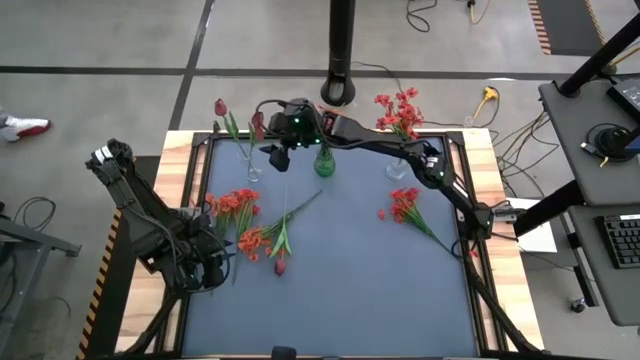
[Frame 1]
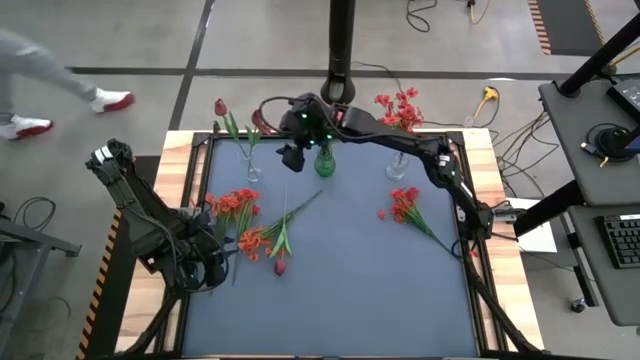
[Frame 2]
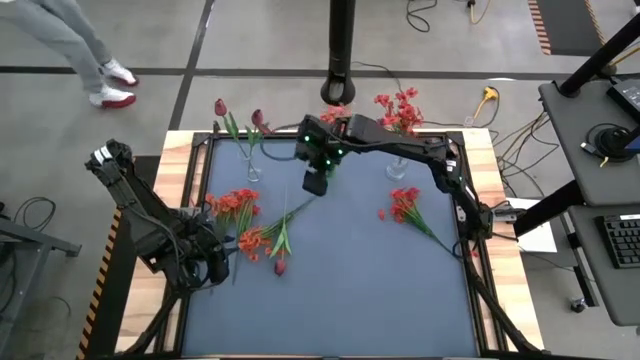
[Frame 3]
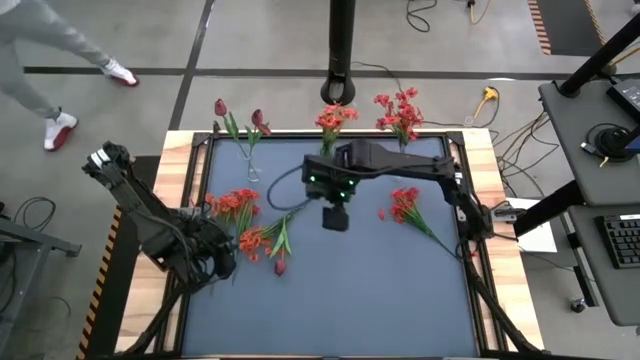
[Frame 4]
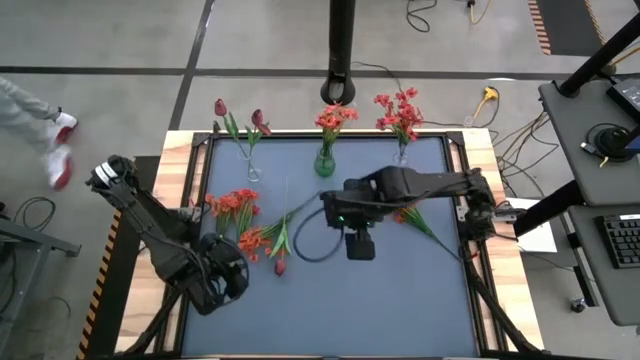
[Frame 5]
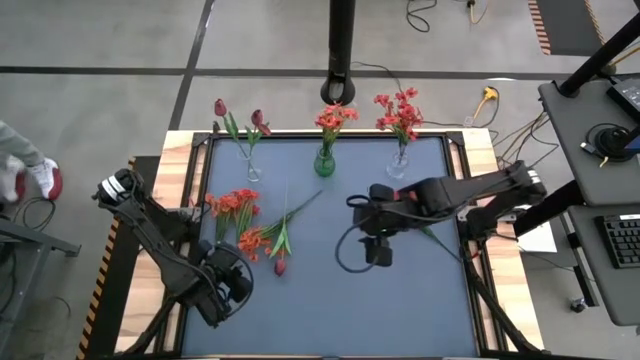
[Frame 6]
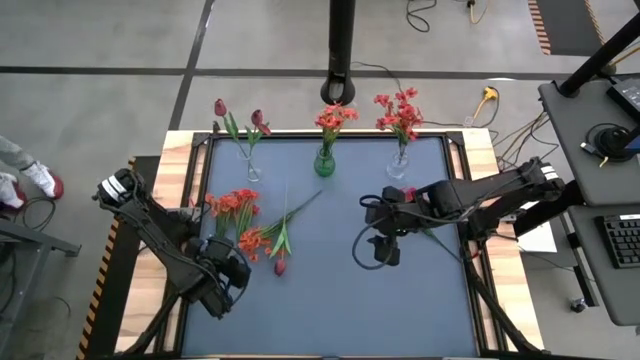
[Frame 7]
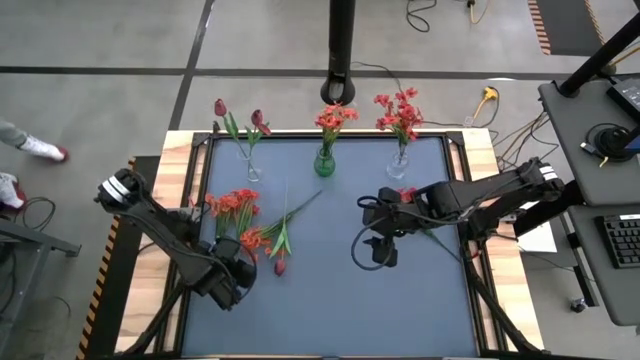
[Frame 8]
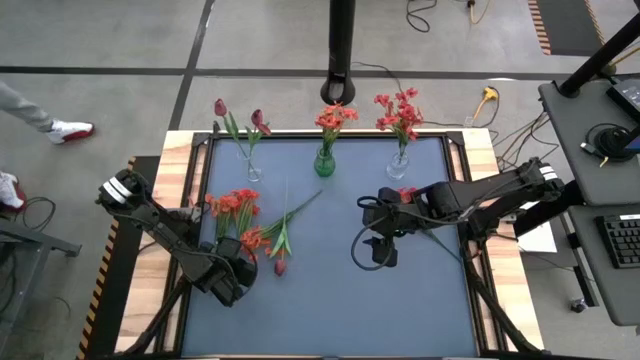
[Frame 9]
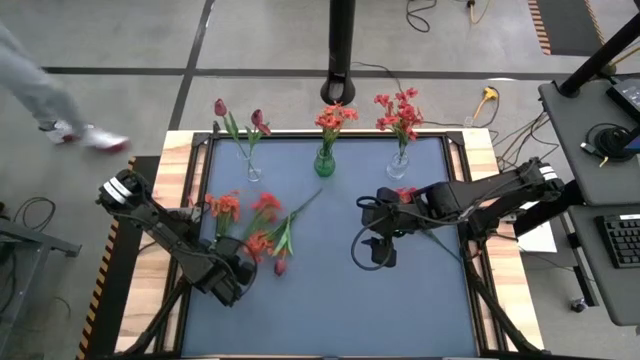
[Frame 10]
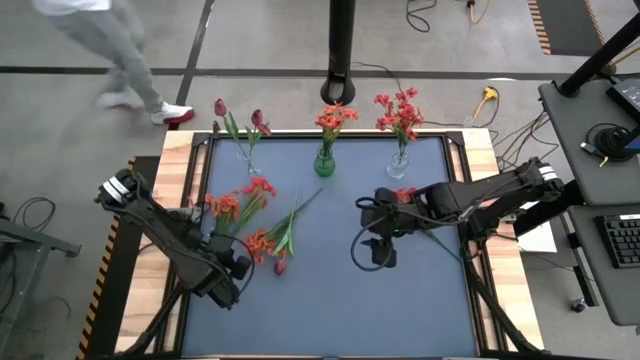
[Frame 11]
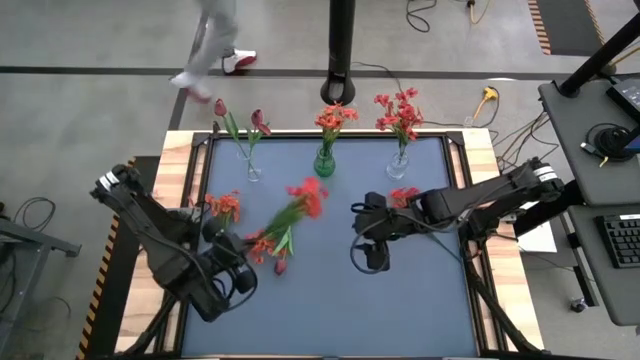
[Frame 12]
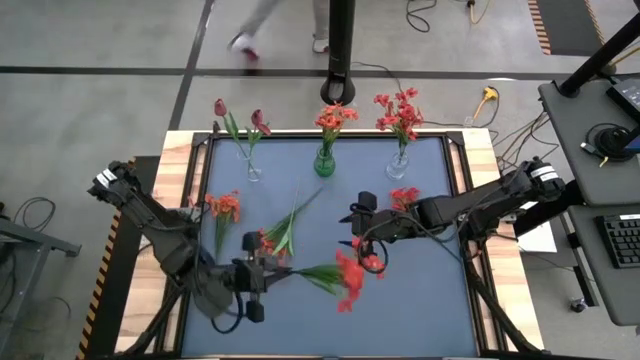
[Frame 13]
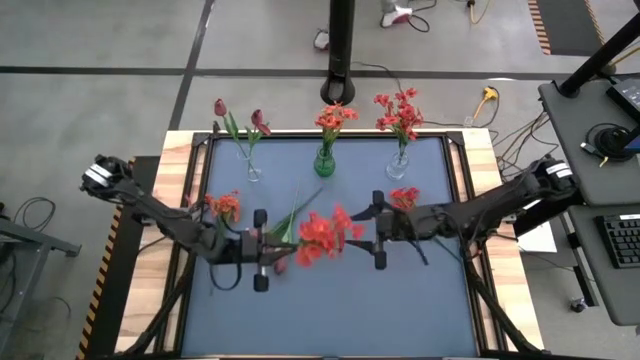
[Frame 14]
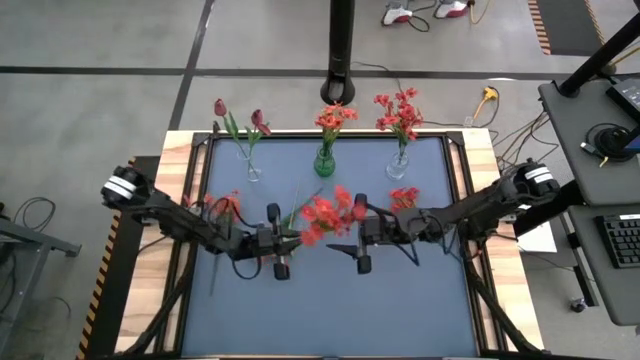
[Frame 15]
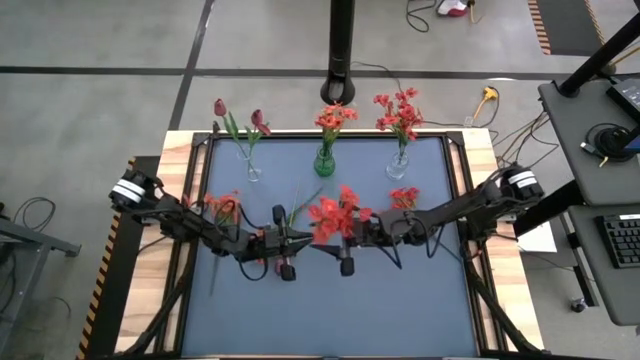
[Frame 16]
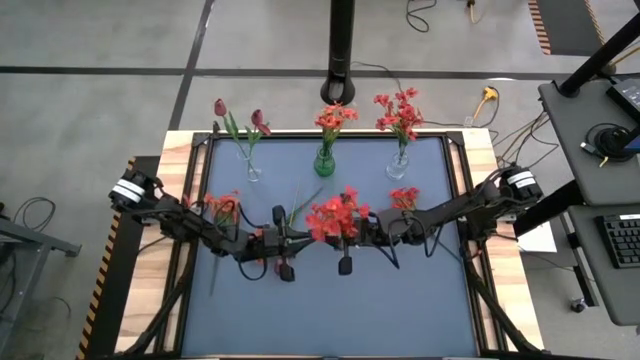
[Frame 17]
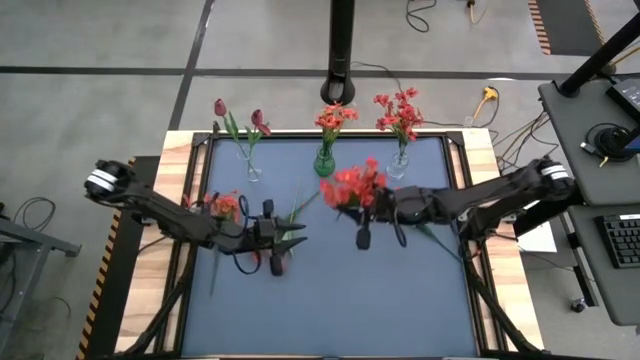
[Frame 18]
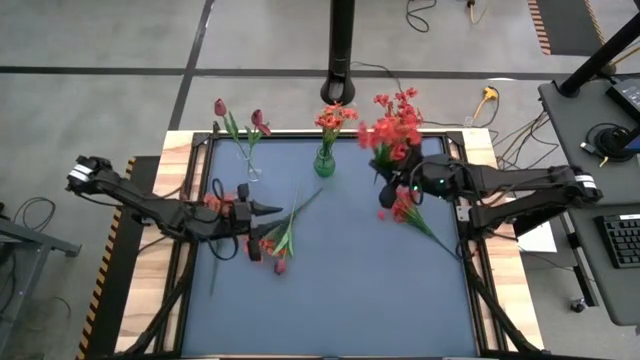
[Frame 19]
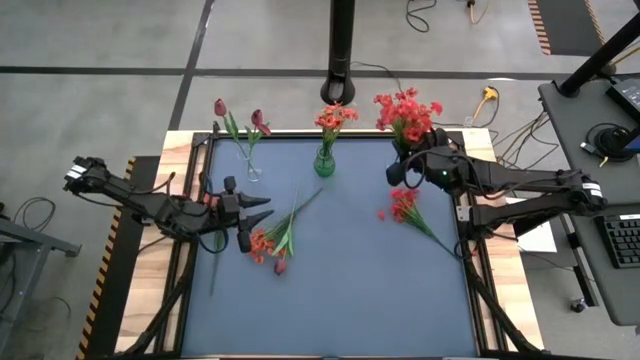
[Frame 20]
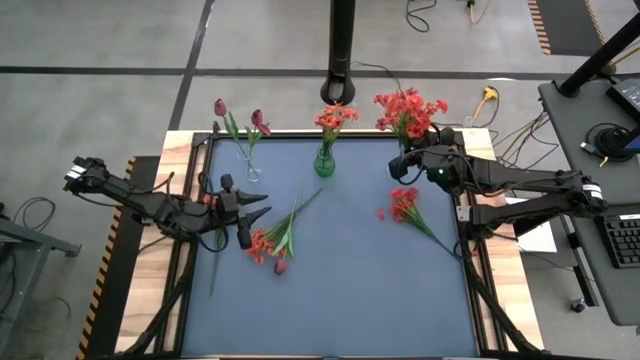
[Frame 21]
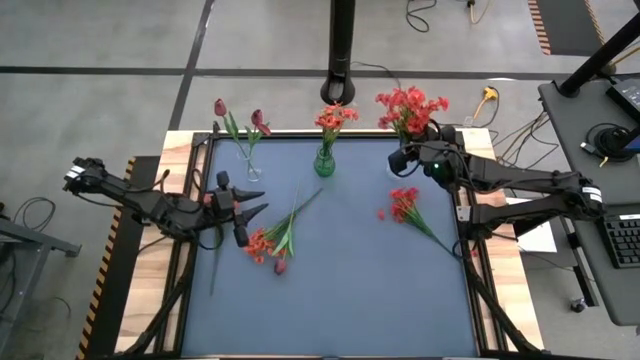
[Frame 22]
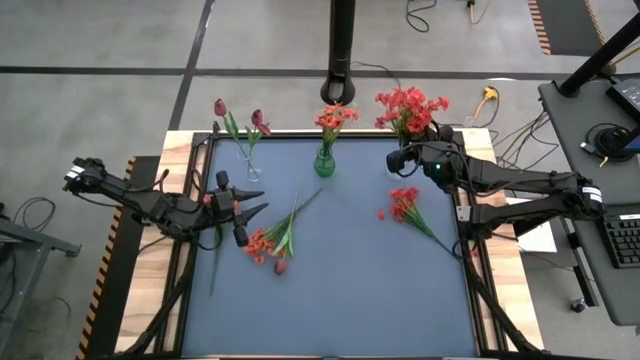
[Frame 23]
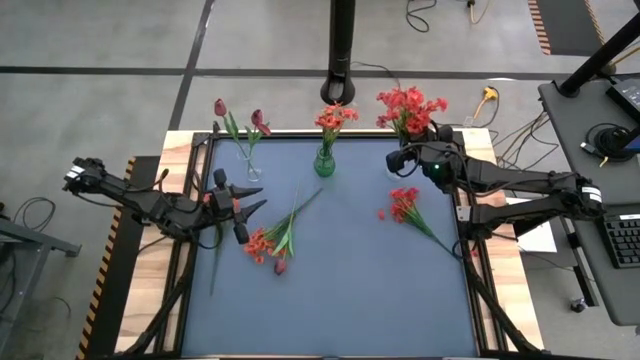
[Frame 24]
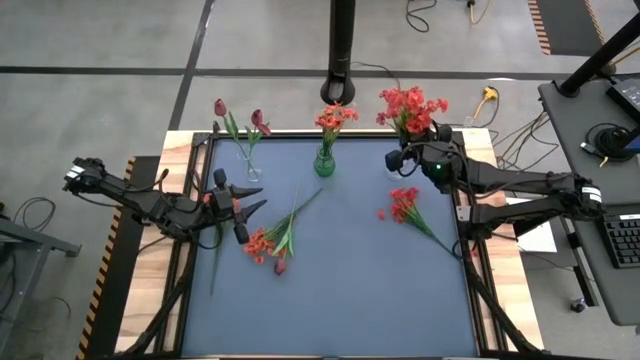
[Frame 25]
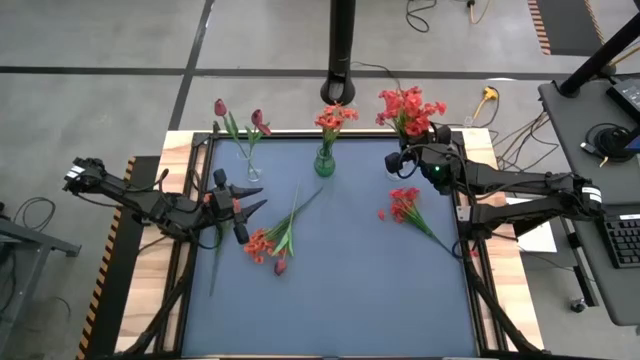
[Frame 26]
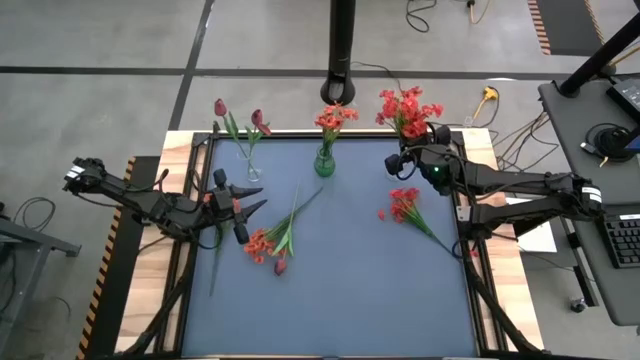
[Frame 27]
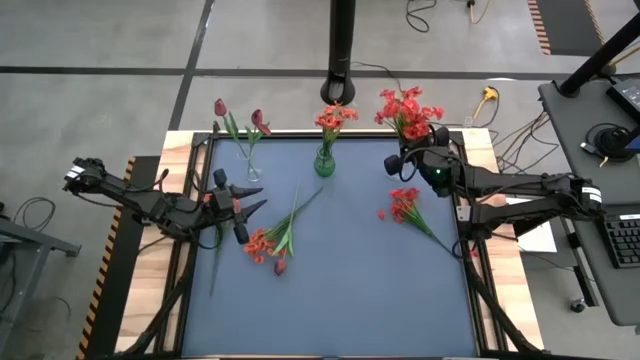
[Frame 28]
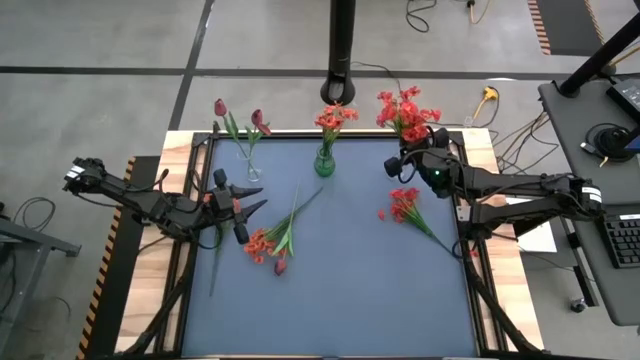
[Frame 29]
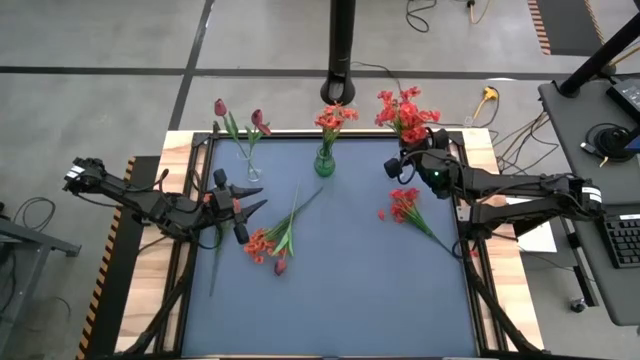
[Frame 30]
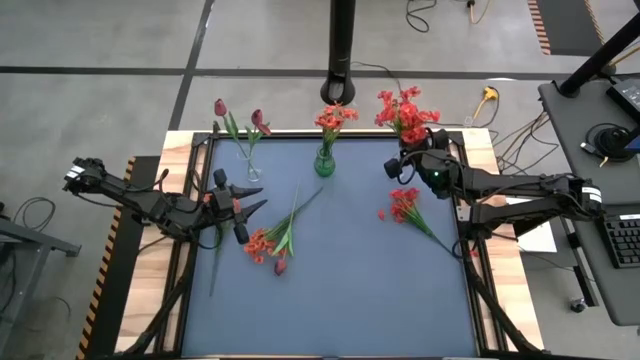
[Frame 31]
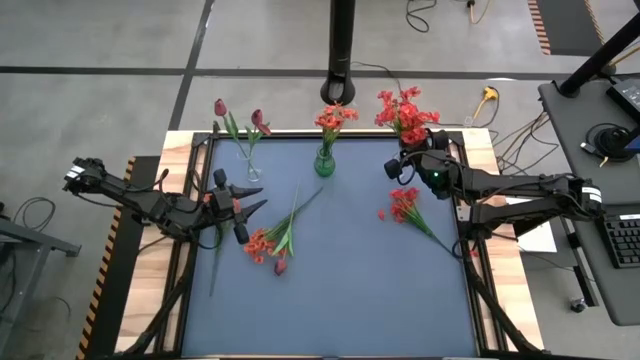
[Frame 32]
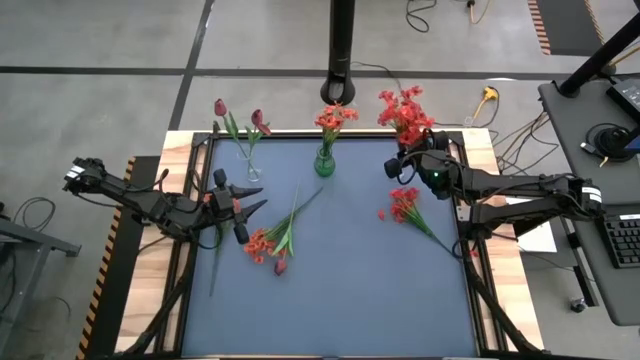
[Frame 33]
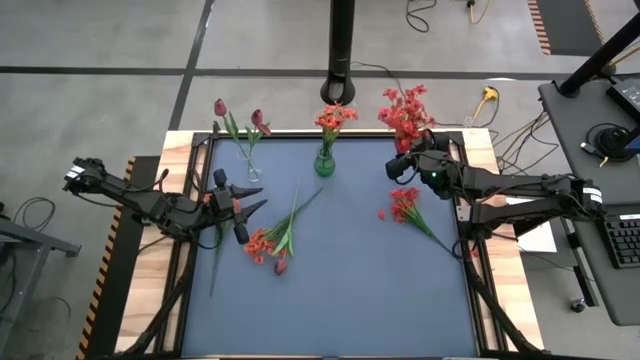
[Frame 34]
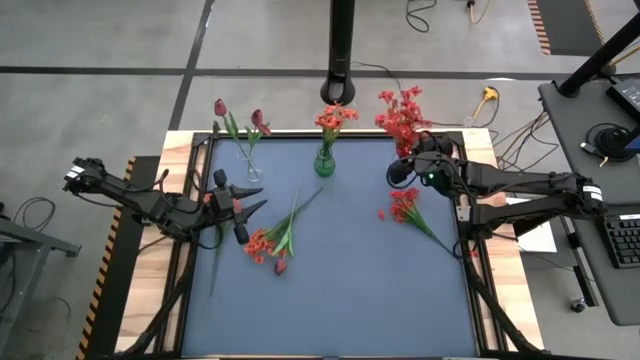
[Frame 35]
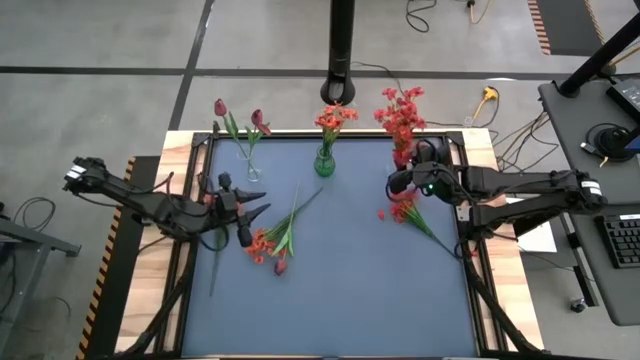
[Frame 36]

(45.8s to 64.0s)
Task: Sort flowers into vase by color
Put the left red flowers into the right transparent vase

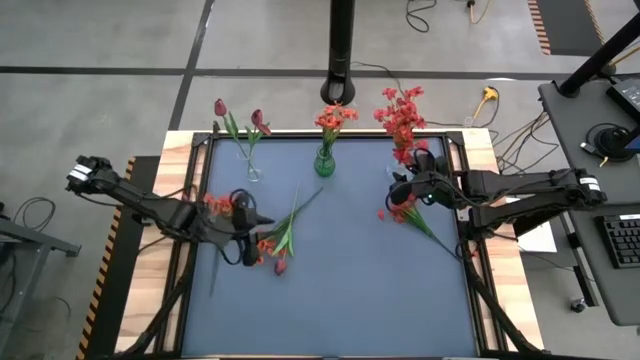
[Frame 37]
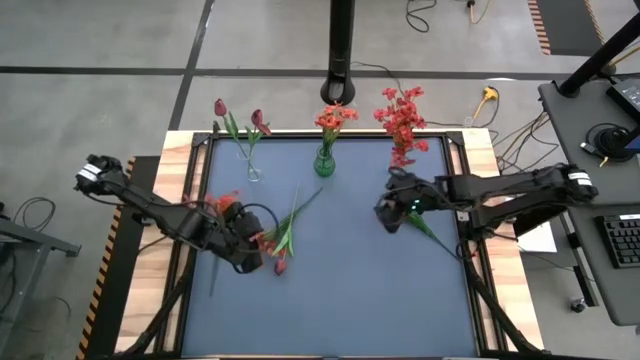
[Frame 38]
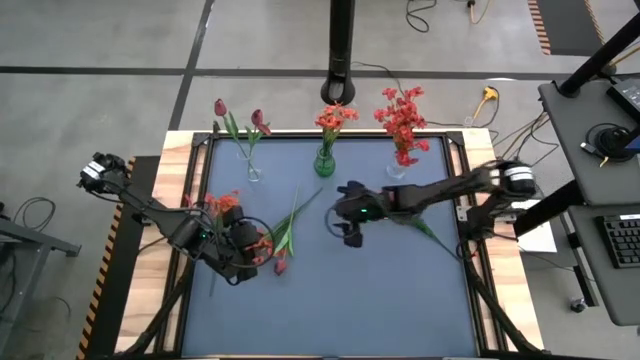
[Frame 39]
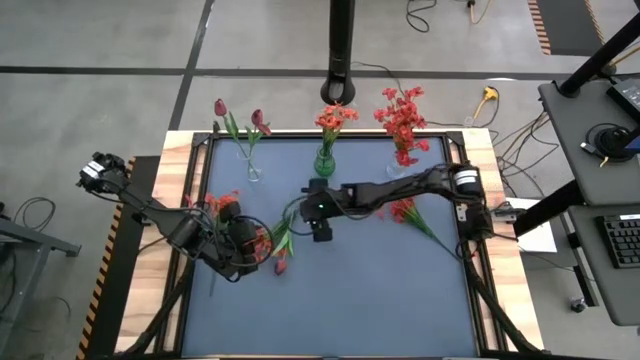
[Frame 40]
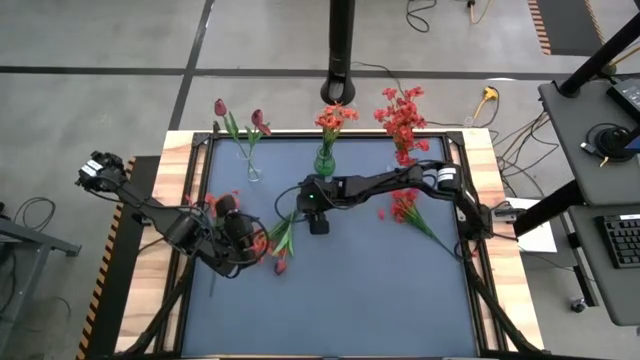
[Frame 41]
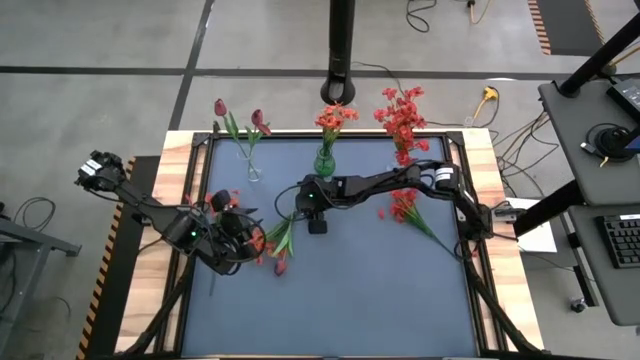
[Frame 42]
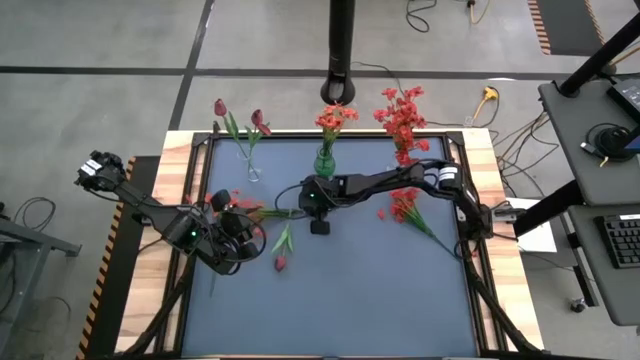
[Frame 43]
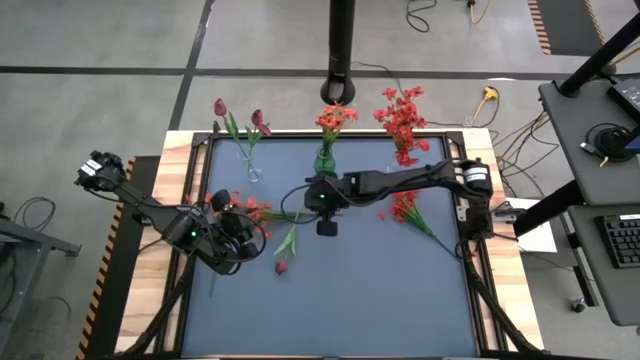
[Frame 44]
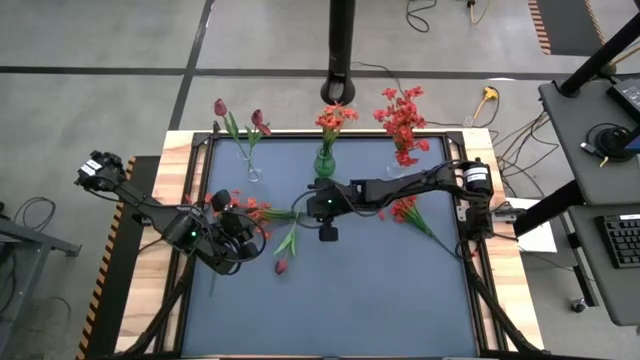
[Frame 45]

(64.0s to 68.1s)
Put the right orange flowers into the green vase
